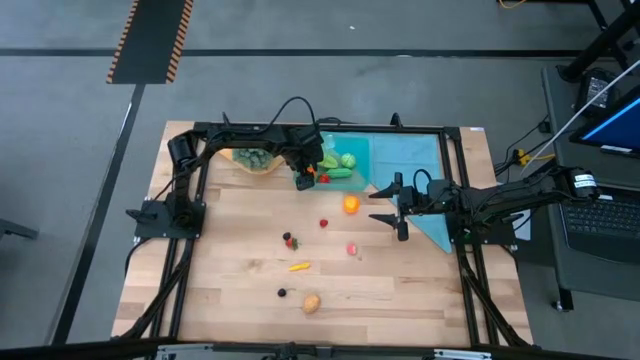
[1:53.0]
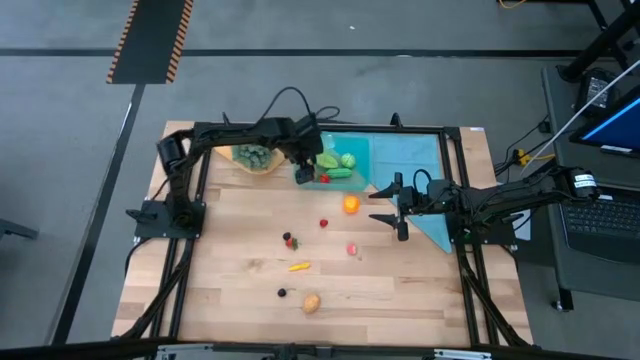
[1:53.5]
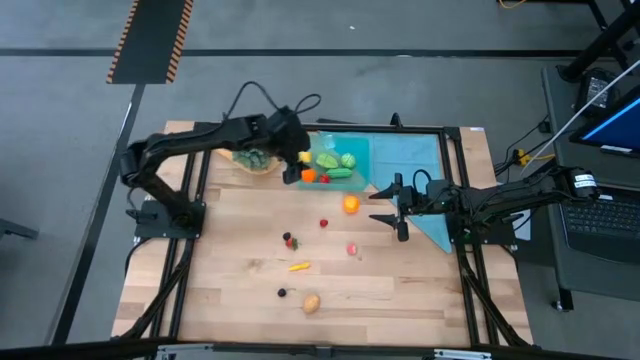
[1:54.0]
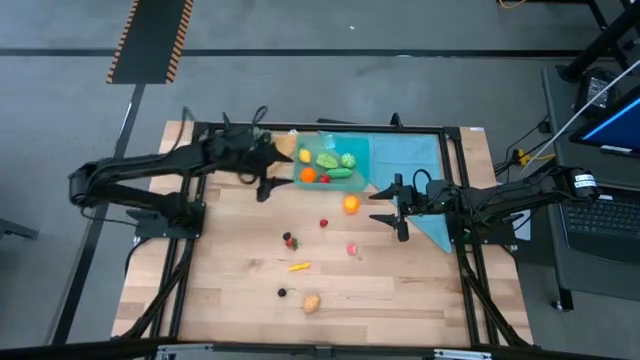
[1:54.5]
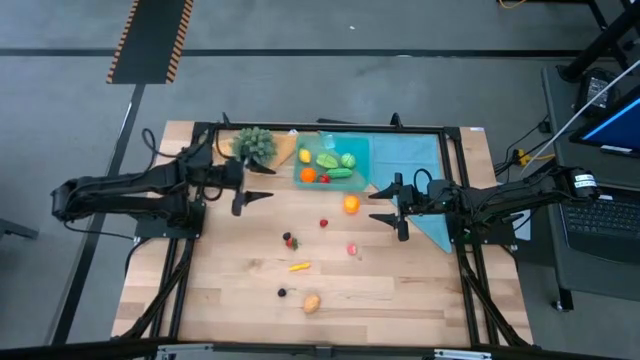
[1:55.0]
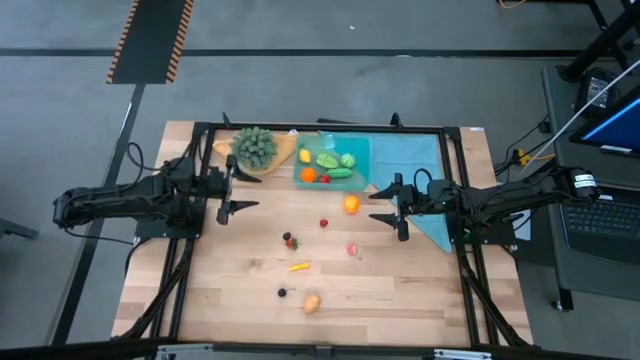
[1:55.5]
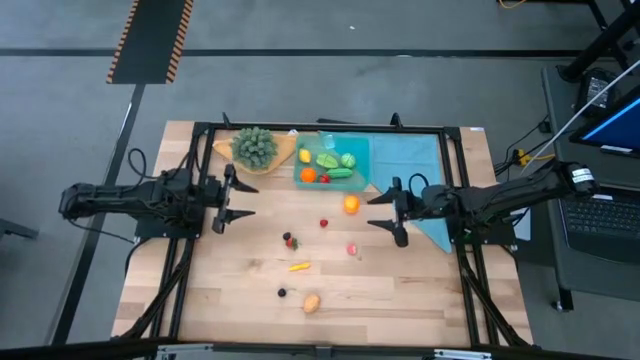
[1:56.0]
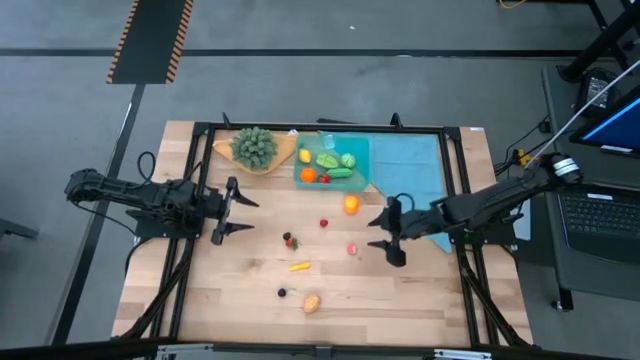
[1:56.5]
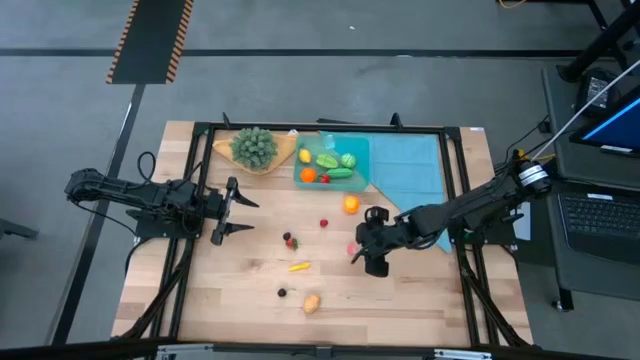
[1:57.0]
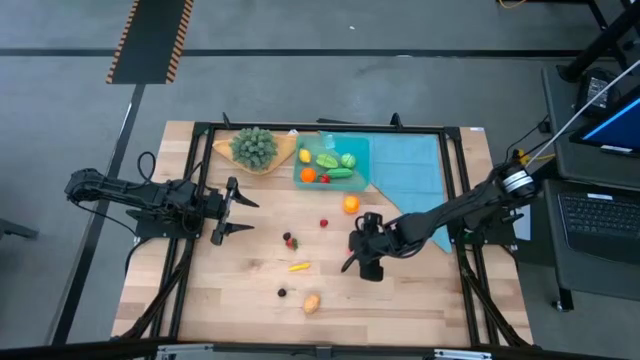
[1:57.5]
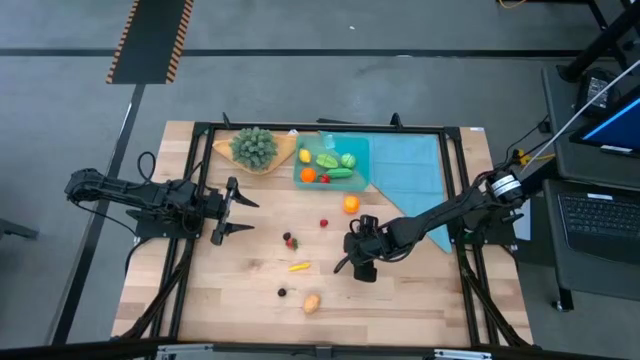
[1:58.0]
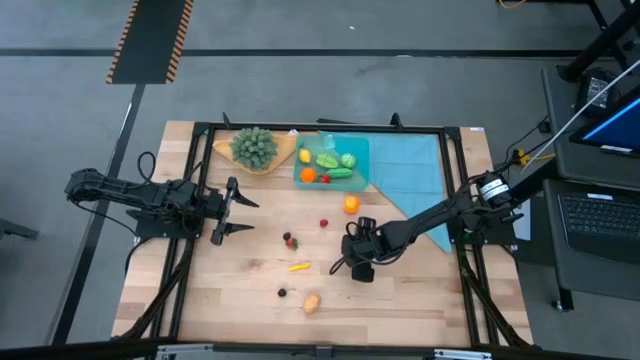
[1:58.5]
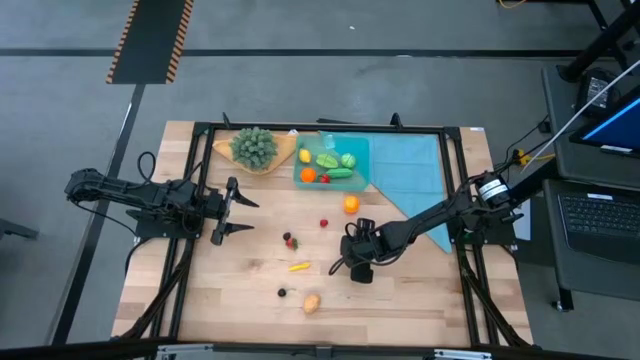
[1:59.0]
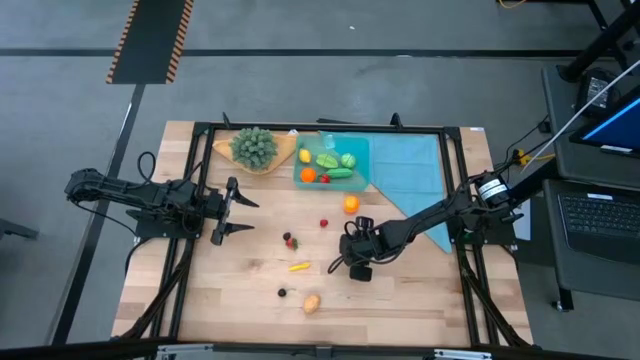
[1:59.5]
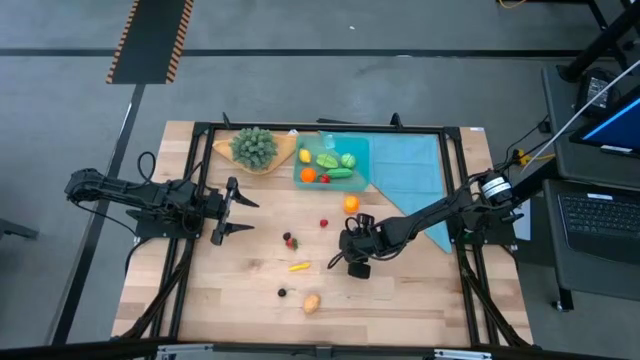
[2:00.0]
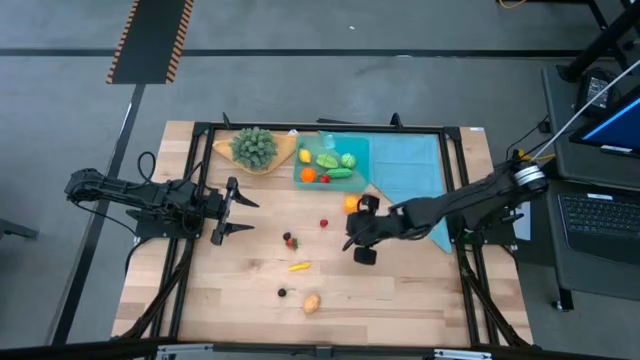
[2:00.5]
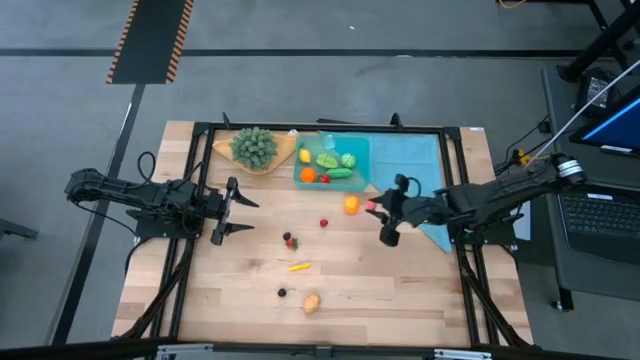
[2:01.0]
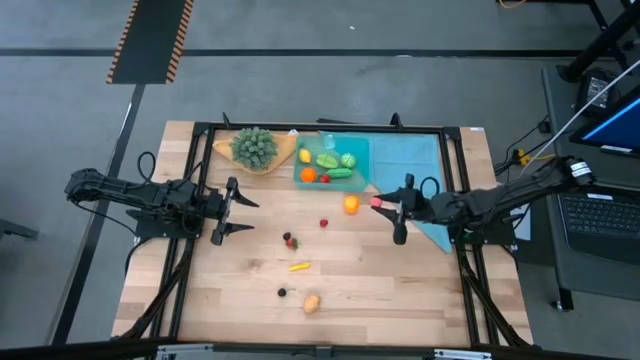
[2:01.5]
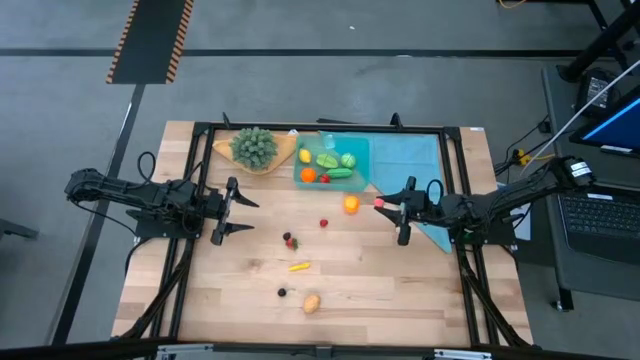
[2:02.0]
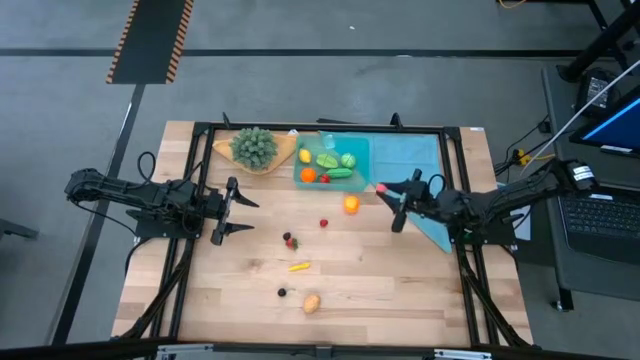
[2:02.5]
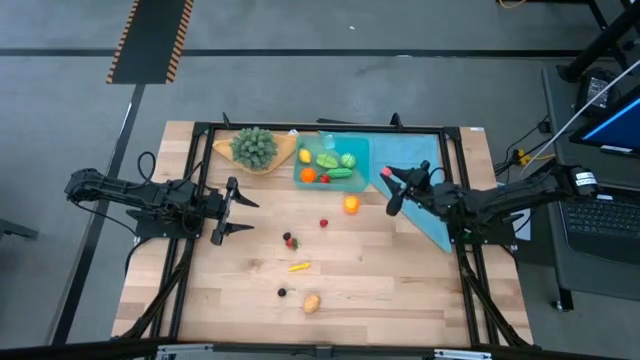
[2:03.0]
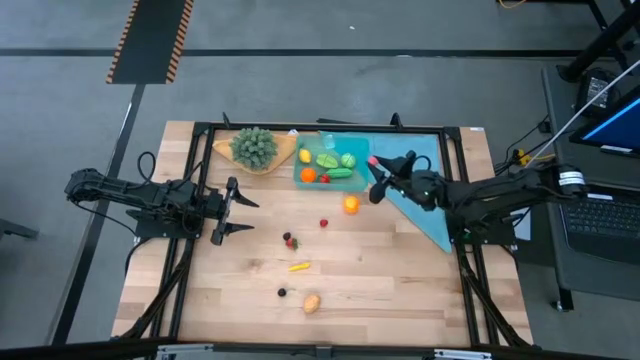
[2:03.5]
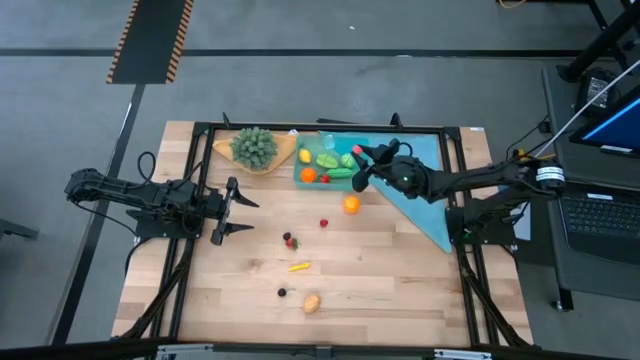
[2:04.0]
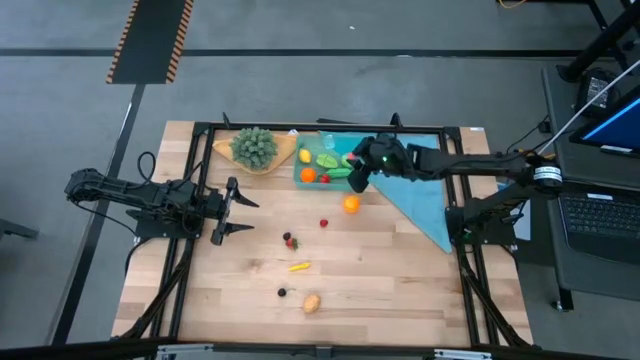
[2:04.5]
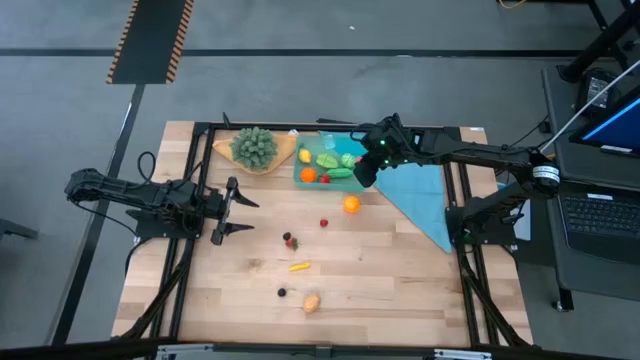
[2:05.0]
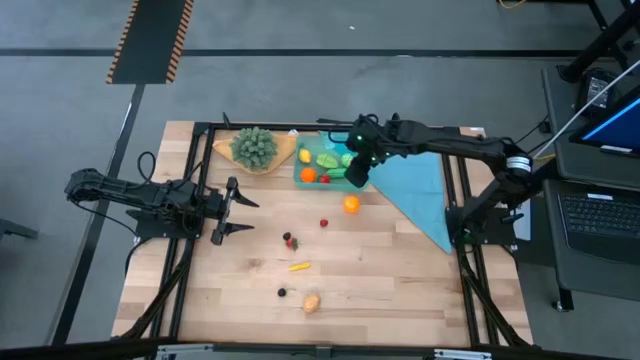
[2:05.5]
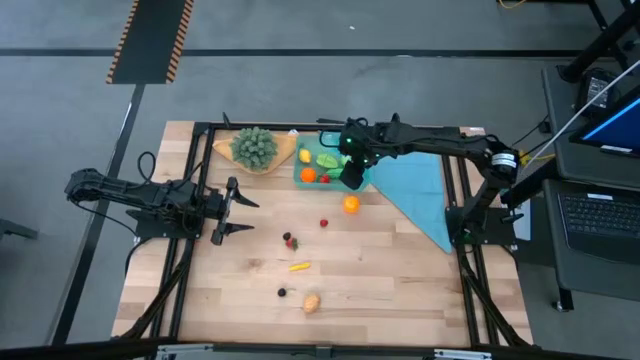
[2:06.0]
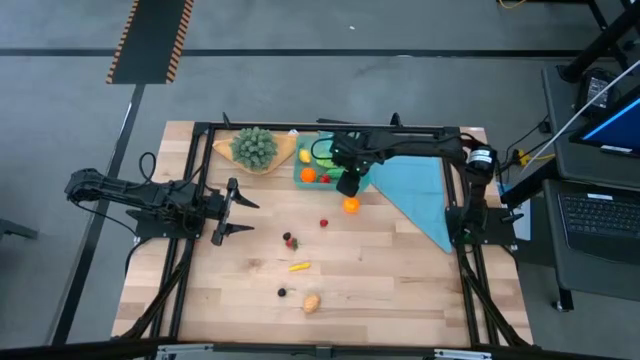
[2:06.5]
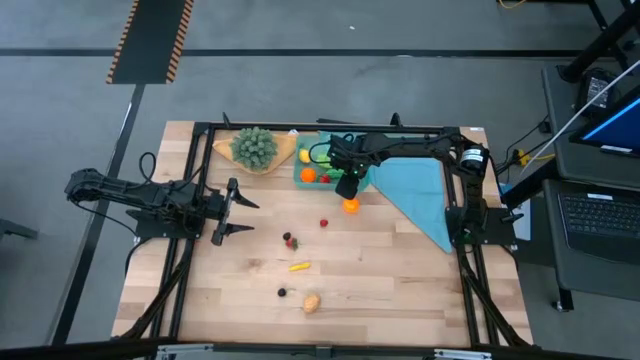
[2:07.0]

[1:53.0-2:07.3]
Task: Pick and placing Produce into tupperware
Put the peach into the blue bin
